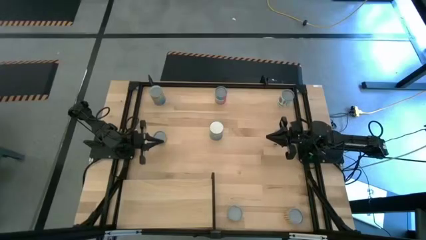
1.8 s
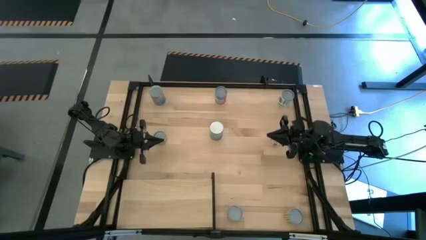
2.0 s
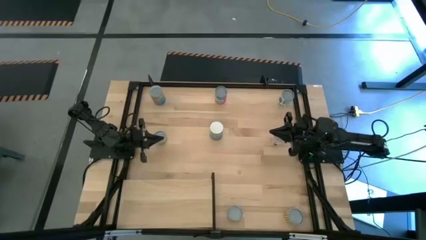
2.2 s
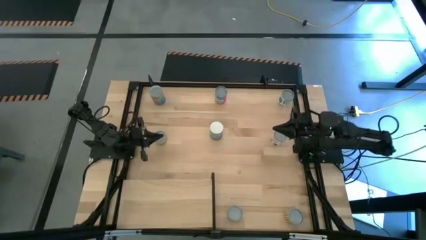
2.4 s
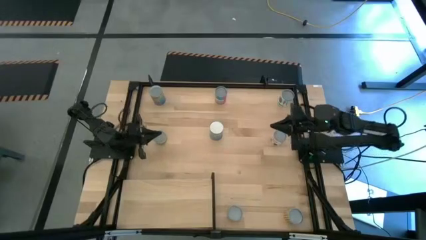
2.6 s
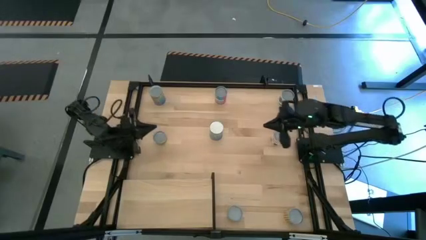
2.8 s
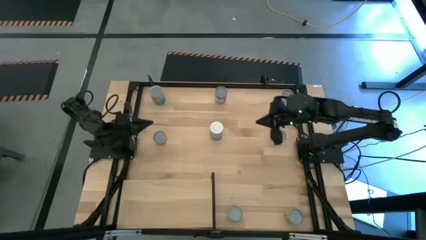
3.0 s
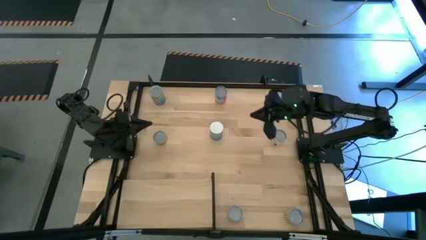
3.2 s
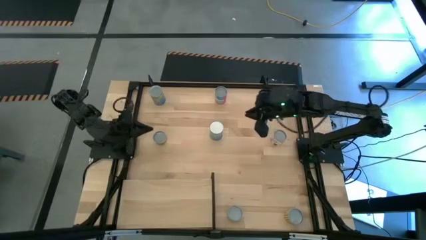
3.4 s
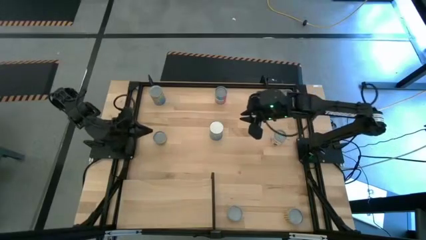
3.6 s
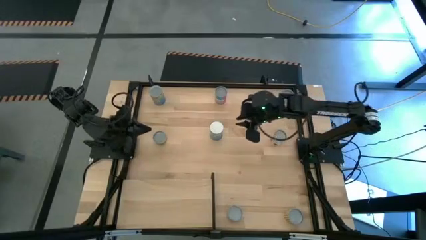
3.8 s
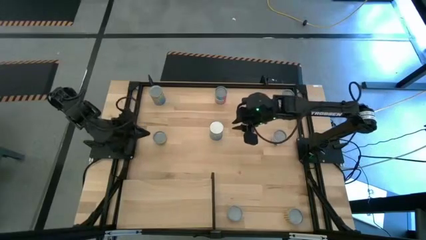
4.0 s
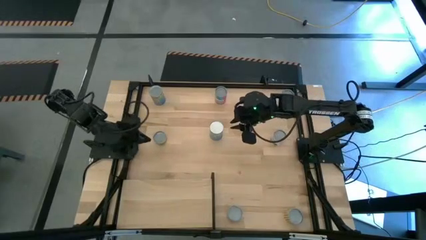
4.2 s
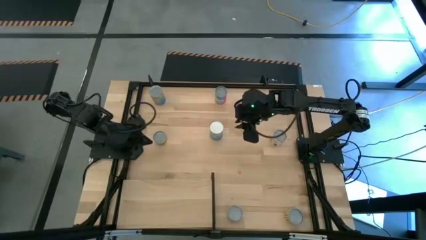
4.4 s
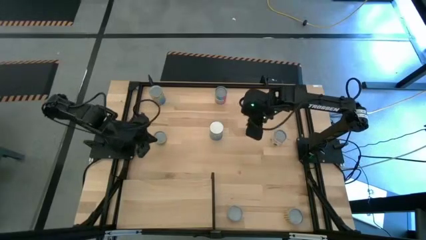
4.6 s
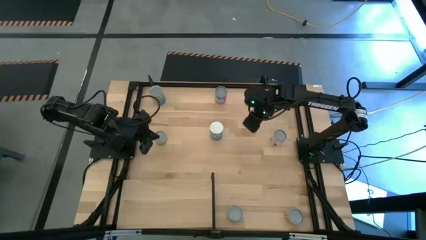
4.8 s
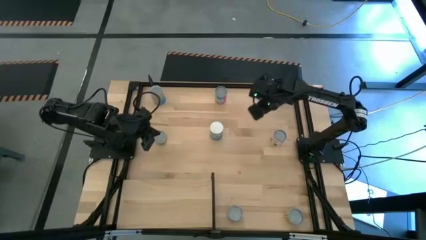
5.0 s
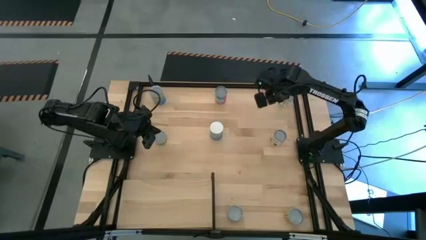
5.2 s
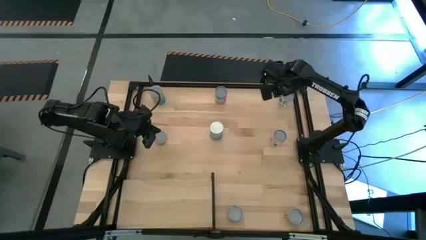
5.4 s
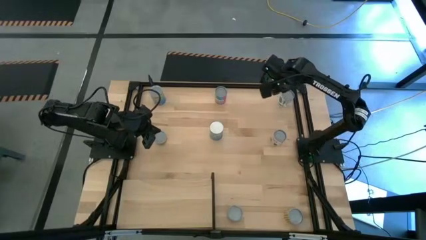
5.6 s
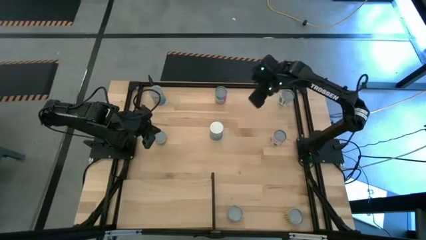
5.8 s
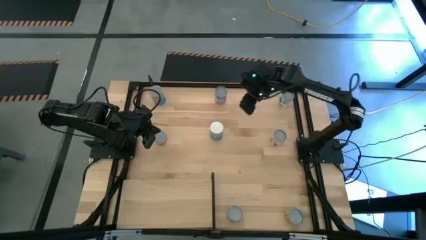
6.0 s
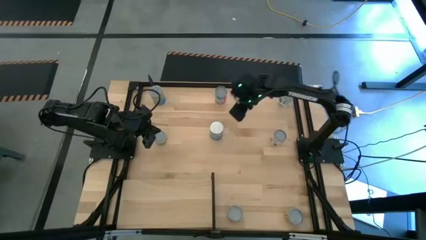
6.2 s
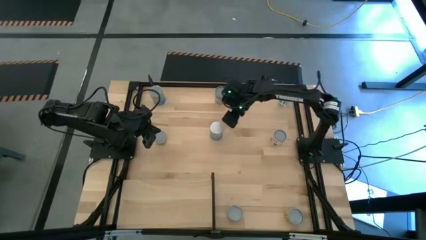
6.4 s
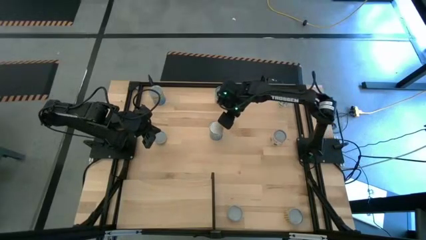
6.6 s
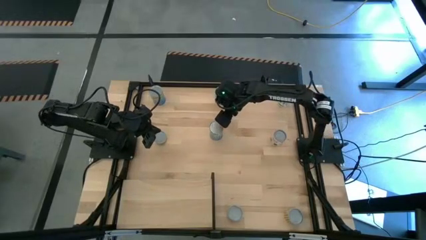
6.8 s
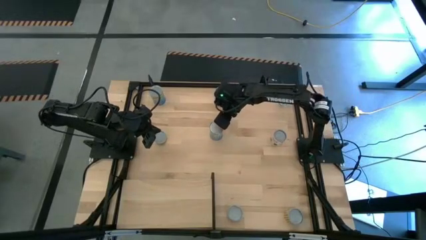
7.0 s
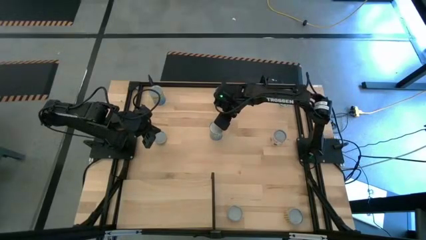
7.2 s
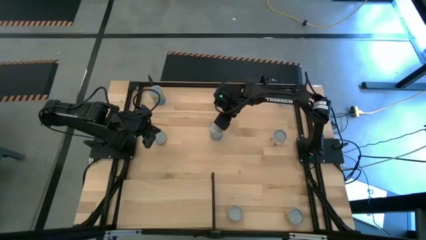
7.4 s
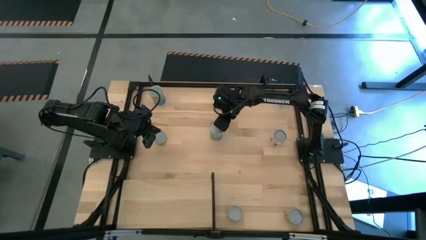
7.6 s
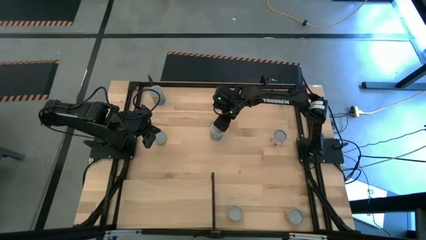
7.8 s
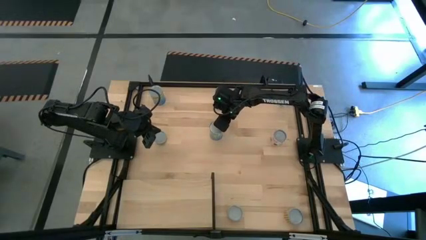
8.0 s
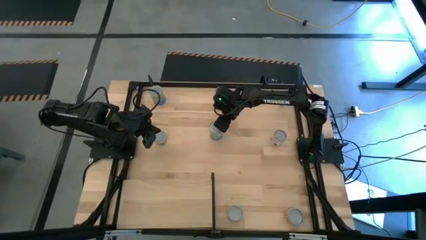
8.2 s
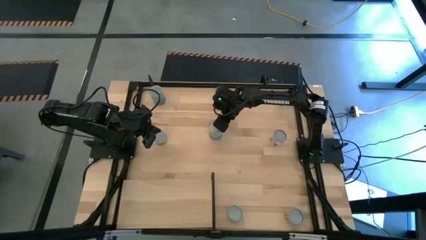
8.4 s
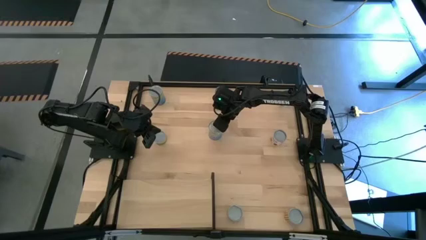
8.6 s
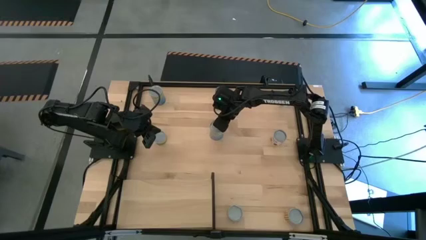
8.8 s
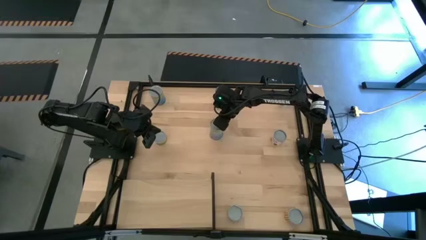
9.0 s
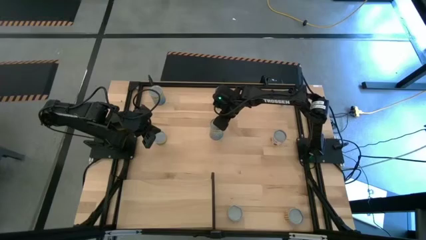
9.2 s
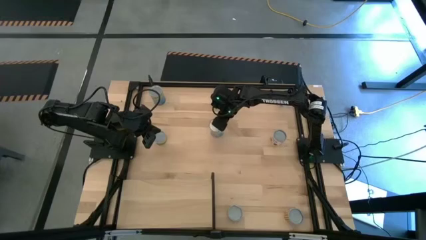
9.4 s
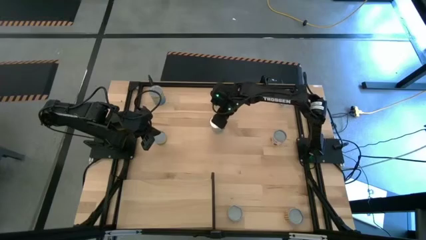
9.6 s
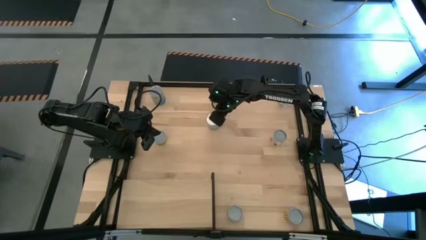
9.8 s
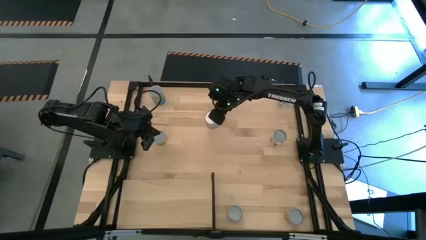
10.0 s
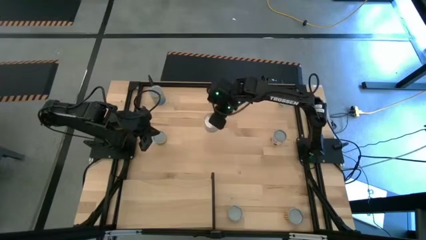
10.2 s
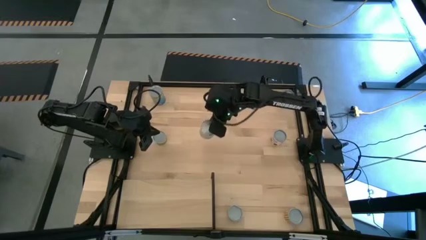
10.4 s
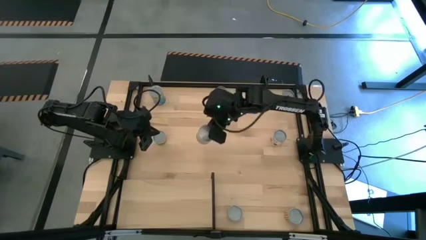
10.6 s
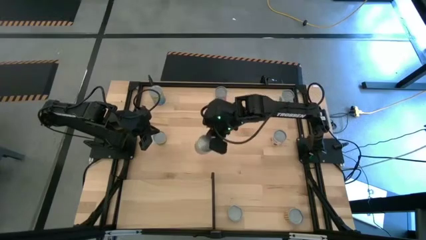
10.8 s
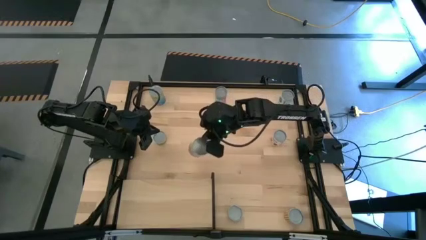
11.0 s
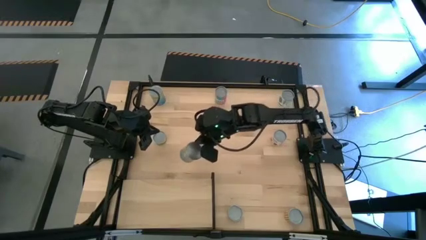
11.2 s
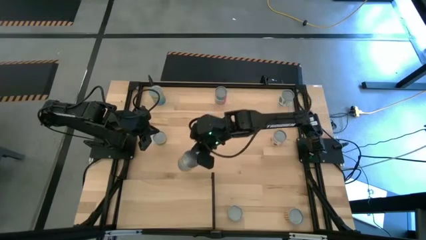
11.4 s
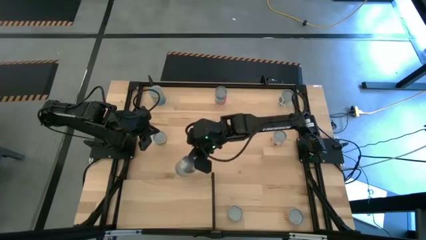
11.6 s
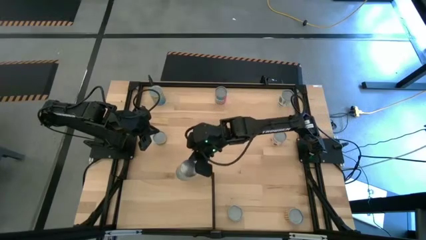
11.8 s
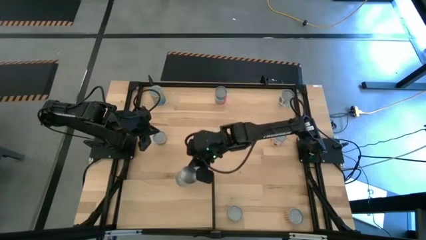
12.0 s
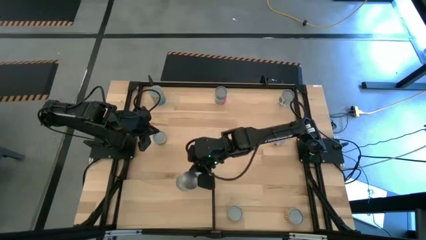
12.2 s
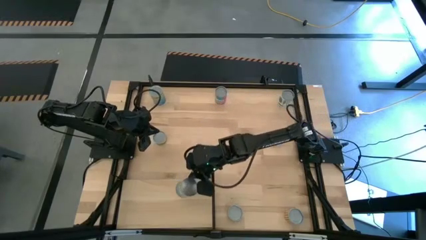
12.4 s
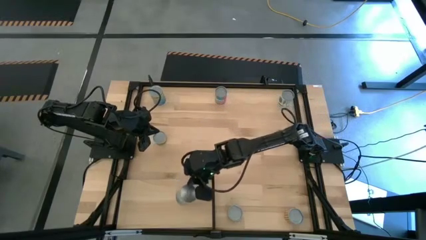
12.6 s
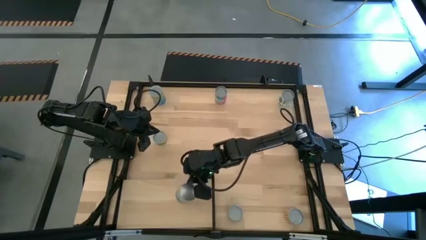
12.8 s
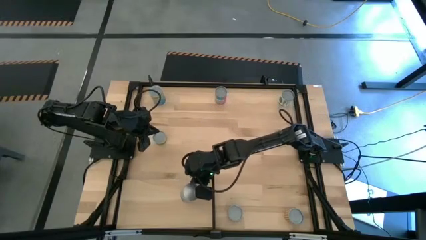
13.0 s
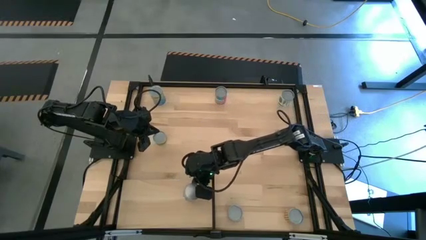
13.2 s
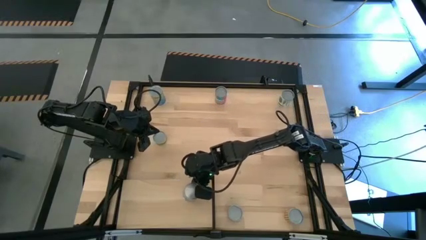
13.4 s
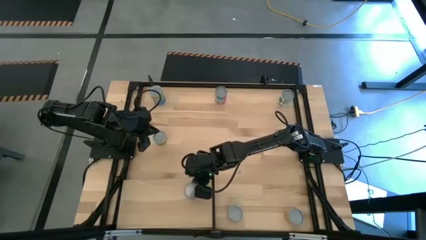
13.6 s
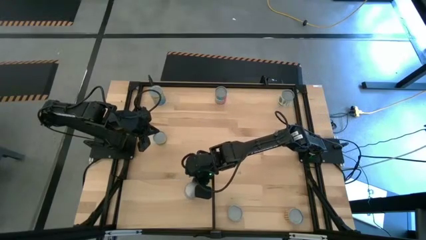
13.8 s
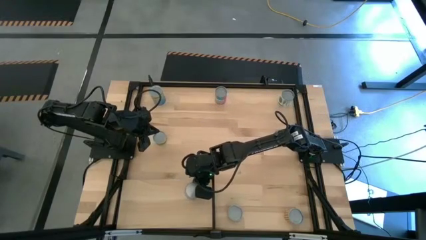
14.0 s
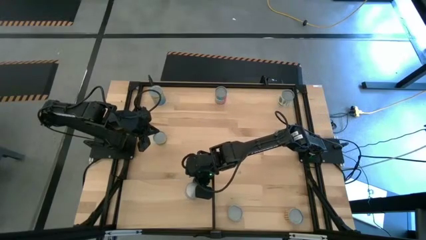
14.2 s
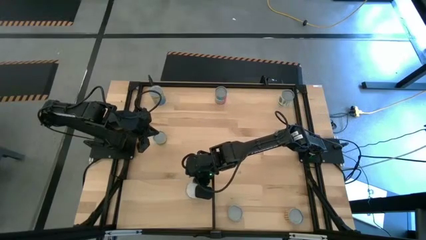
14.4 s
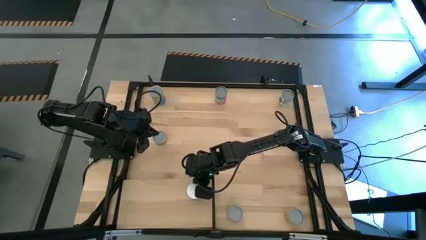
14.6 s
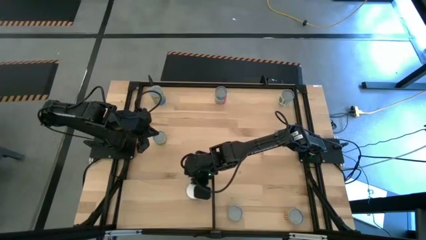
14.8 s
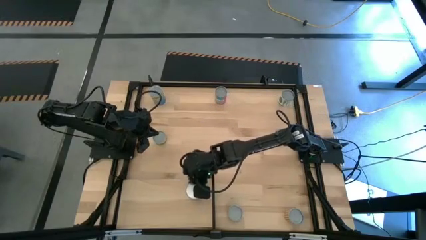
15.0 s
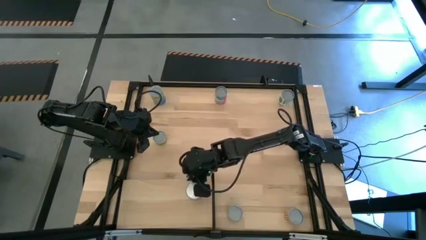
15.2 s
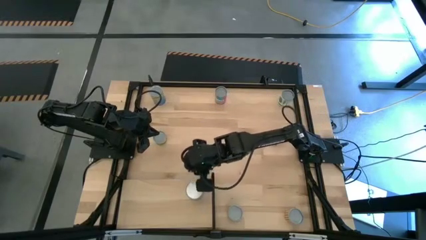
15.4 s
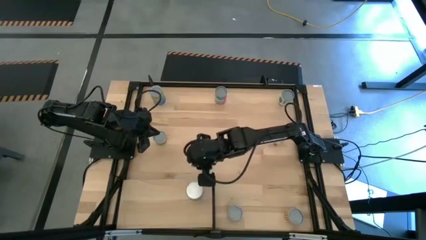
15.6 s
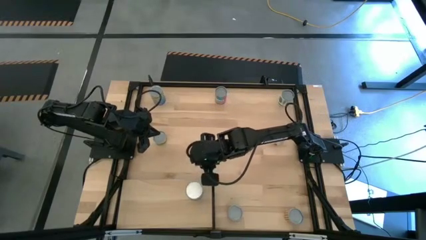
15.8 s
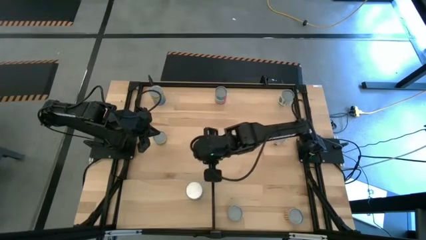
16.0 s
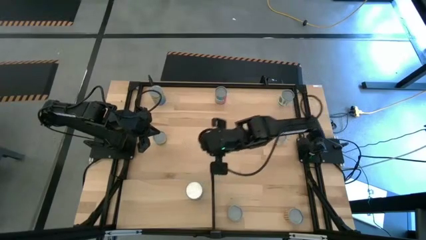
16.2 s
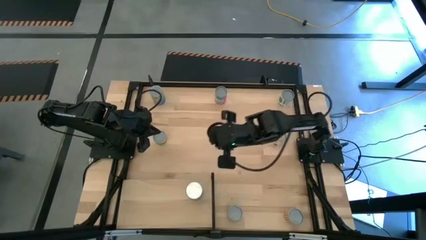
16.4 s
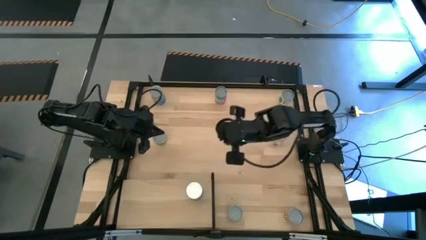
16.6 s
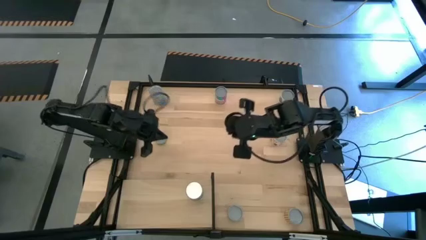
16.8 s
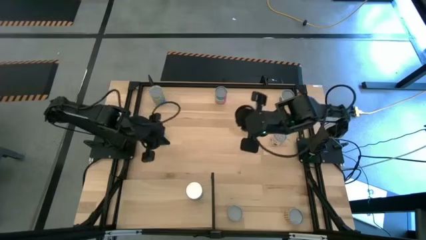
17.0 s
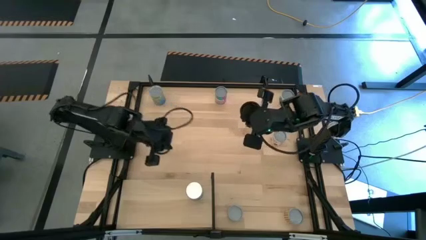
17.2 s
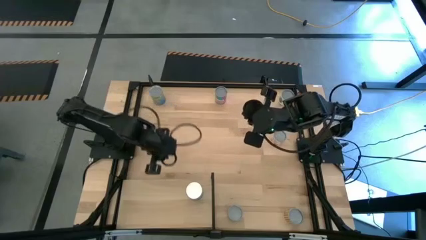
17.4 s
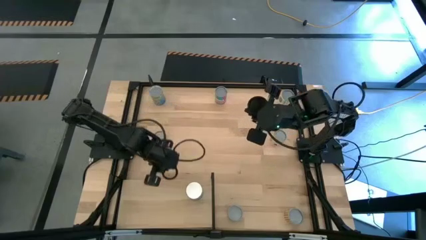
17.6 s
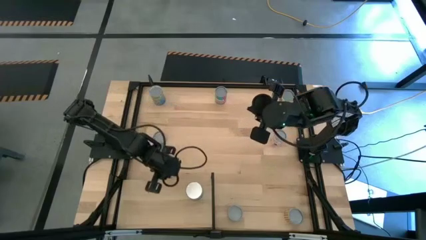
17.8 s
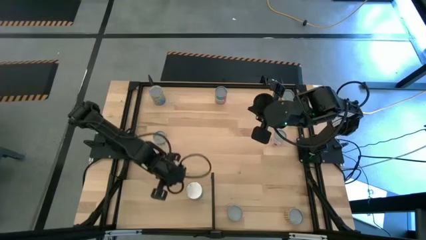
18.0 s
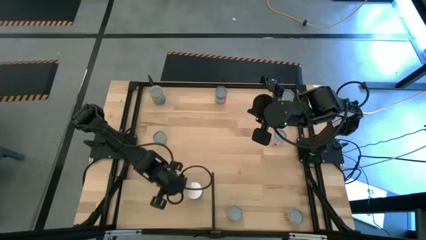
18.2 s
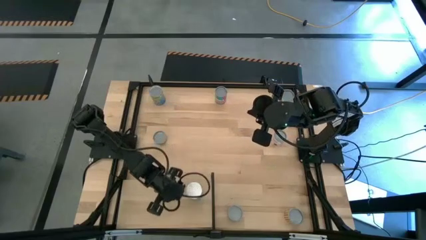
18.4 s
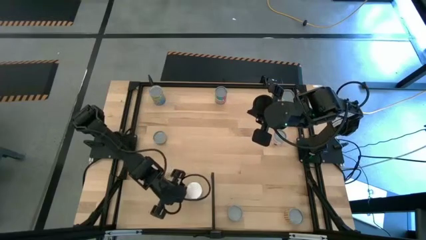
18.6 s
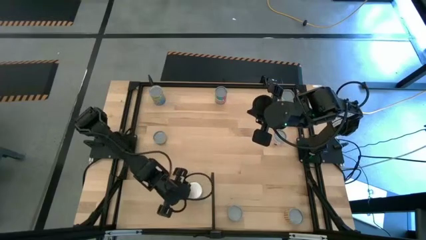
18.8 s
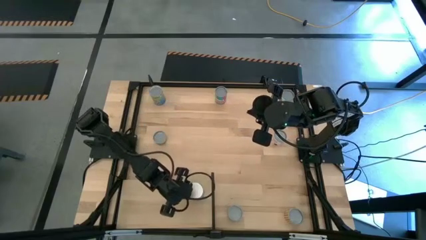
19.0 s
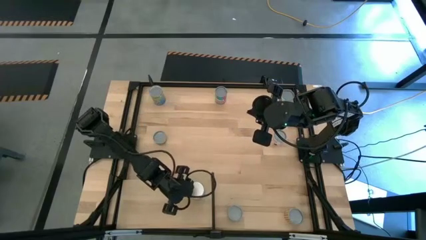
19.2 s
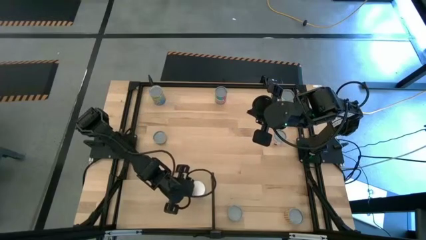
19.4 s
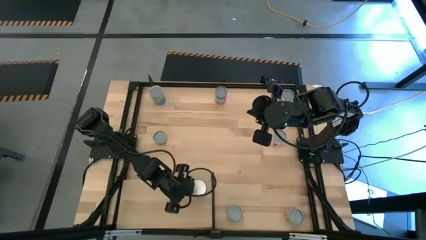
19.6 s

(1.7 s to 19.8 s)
Task: Pick and place cans onto a shelf
Put the canned cherries on the shelf
